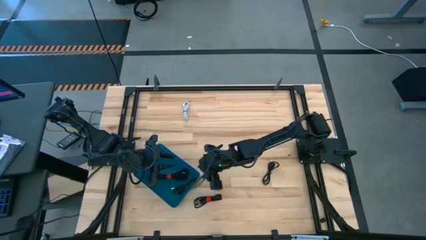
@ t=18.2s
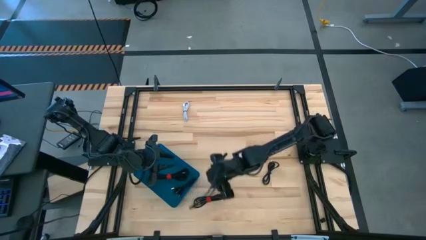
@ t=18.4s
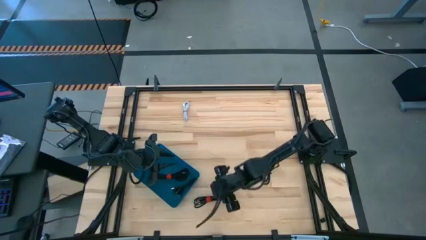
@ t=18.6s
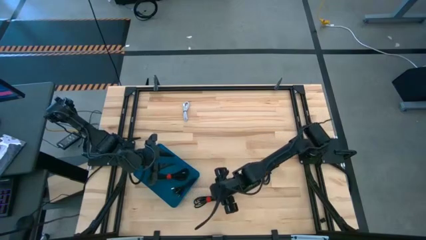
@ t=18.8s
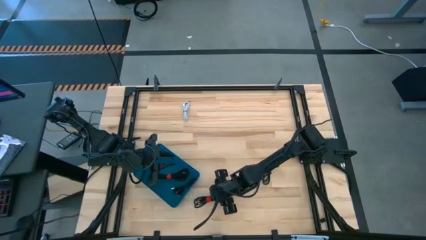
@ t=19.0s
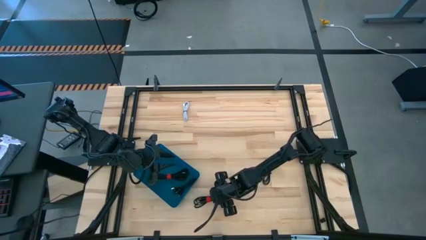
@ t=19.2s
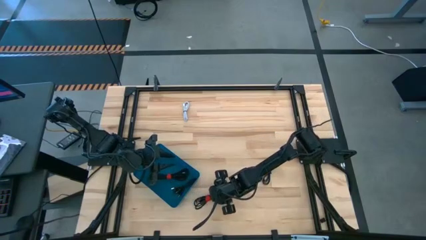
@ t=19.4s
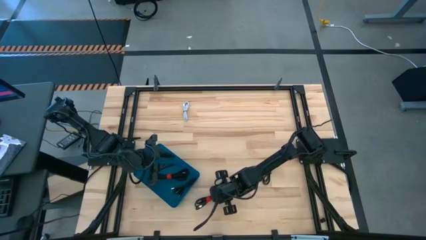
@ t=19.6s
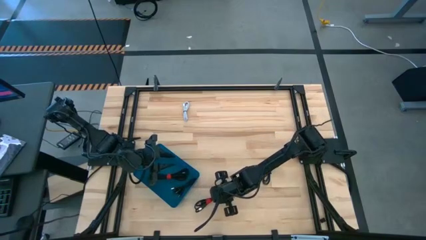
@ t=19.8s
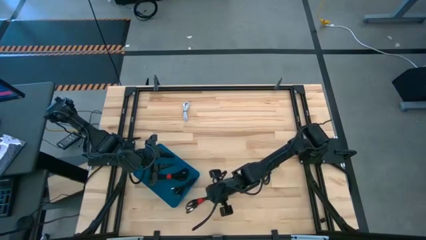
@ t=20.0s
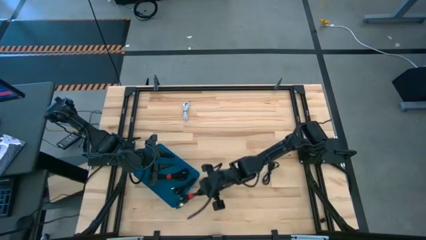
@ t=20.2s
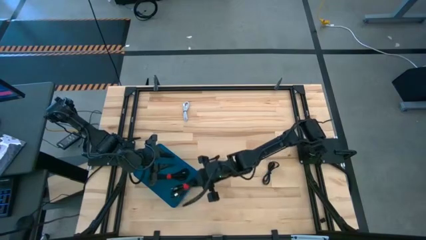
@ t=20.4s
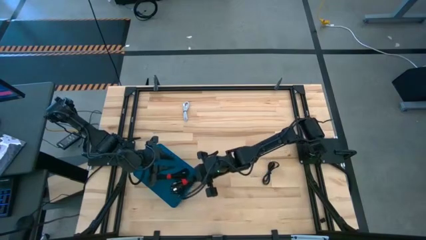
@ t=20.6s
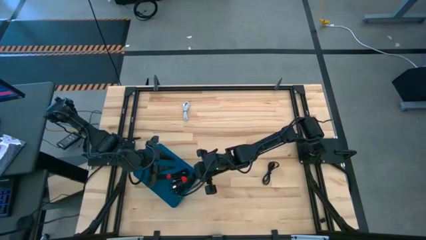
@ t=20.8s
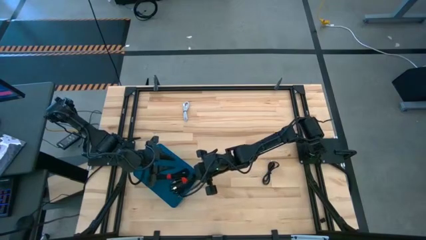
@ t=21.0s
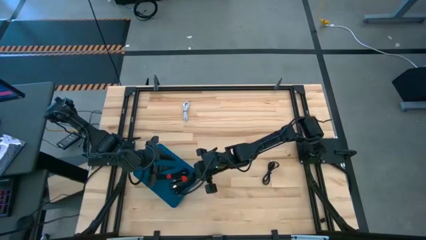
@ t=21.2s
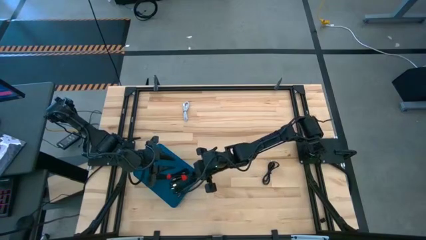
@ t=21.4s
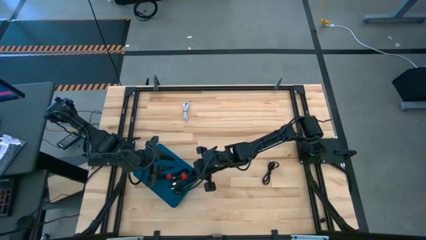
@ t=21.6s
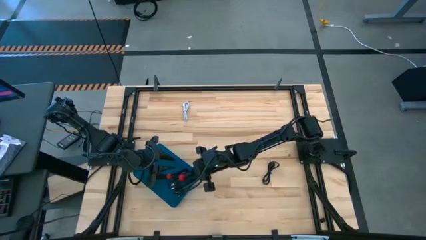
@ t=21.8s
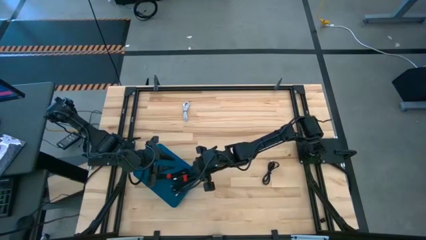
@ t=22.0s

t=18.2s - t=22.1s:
Task: Pick and place USB-C Cables
Put the black charger cable into the blue bin

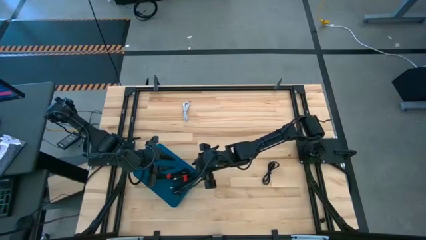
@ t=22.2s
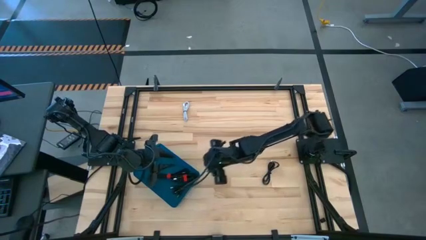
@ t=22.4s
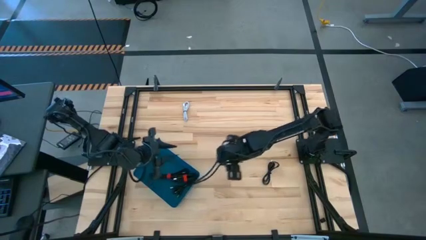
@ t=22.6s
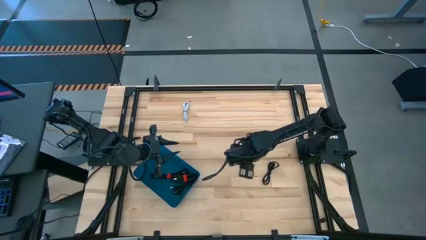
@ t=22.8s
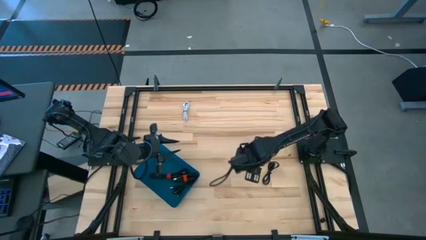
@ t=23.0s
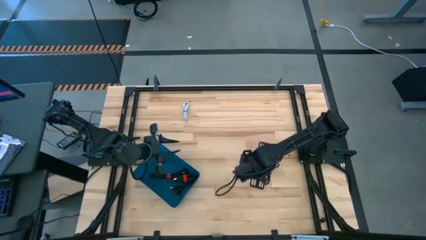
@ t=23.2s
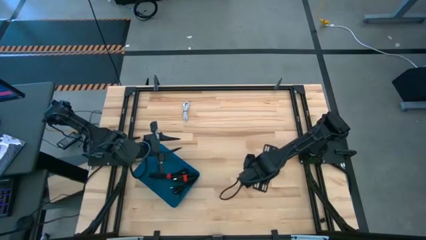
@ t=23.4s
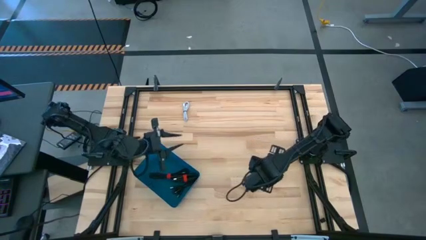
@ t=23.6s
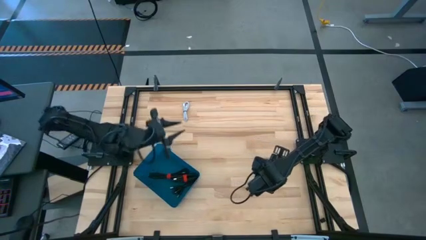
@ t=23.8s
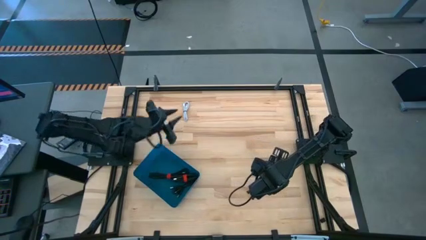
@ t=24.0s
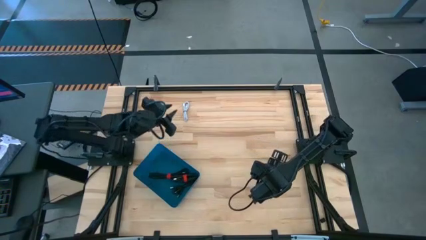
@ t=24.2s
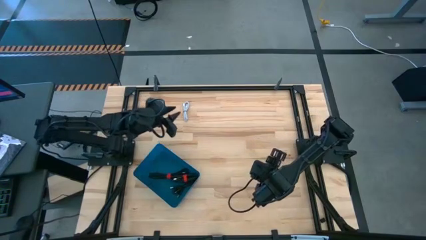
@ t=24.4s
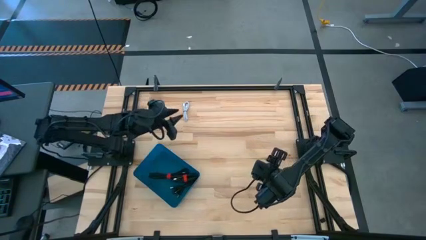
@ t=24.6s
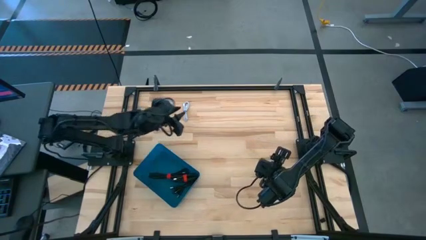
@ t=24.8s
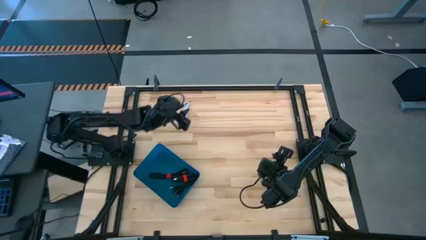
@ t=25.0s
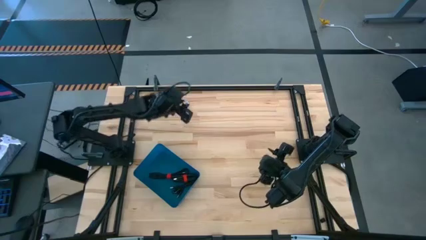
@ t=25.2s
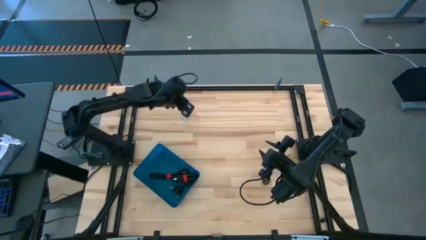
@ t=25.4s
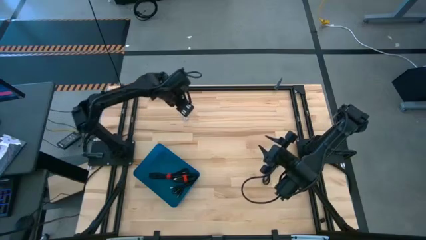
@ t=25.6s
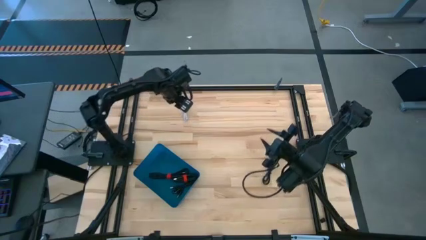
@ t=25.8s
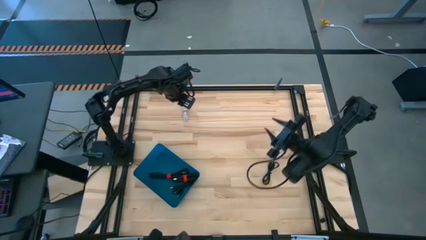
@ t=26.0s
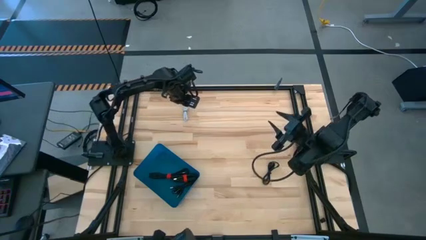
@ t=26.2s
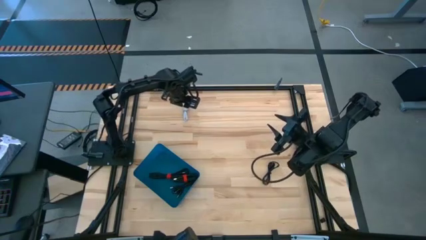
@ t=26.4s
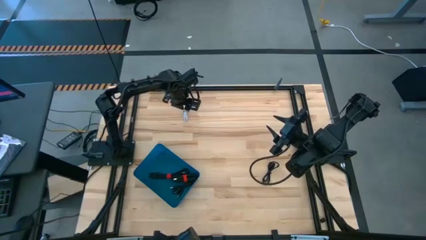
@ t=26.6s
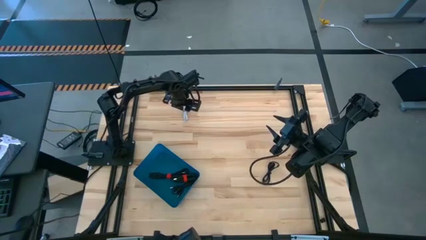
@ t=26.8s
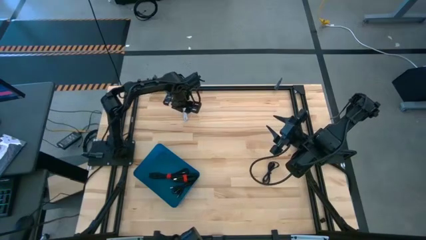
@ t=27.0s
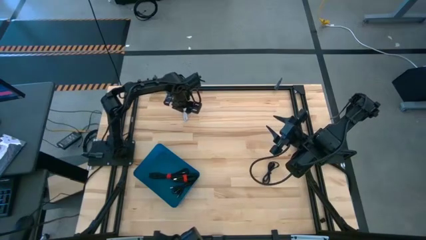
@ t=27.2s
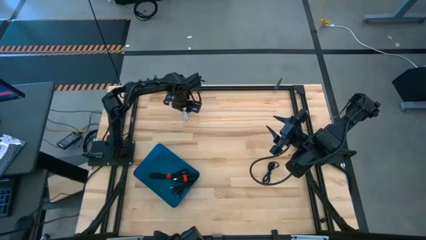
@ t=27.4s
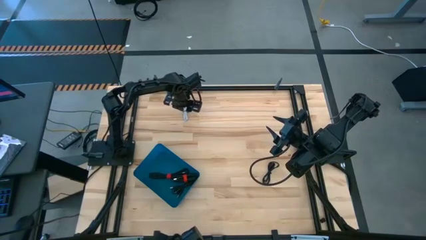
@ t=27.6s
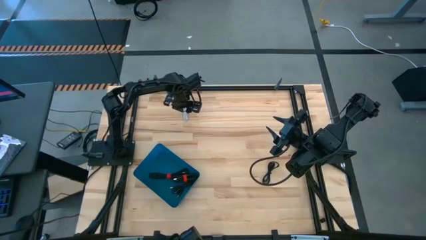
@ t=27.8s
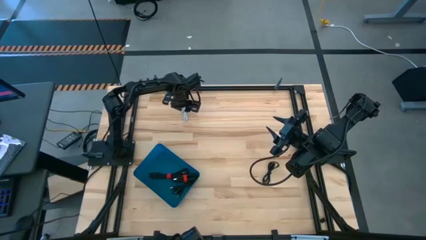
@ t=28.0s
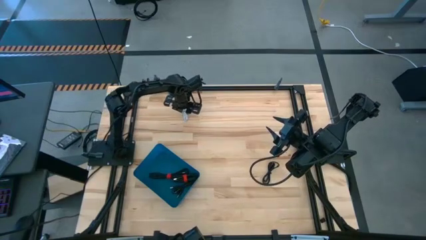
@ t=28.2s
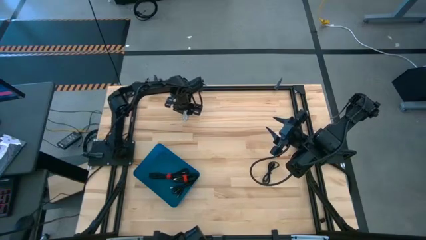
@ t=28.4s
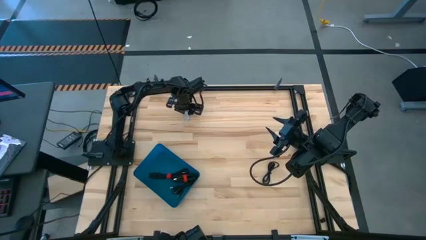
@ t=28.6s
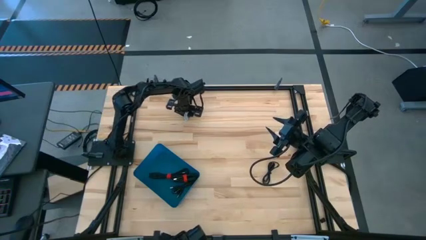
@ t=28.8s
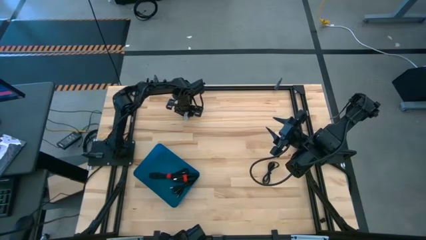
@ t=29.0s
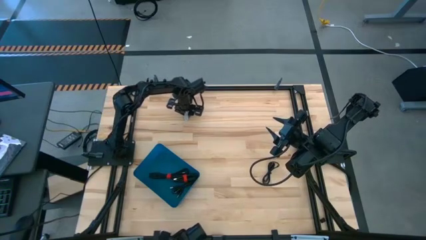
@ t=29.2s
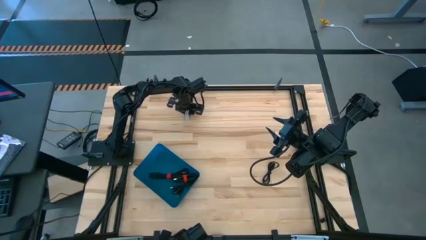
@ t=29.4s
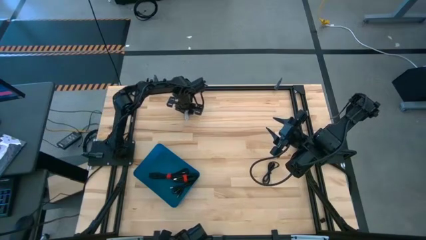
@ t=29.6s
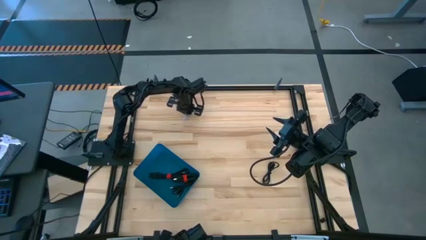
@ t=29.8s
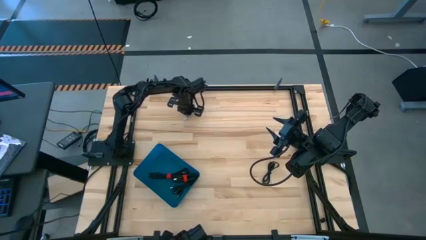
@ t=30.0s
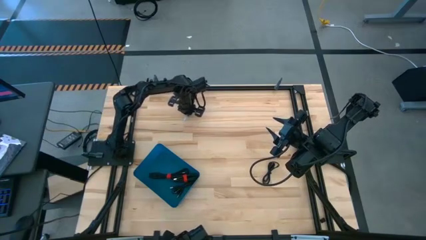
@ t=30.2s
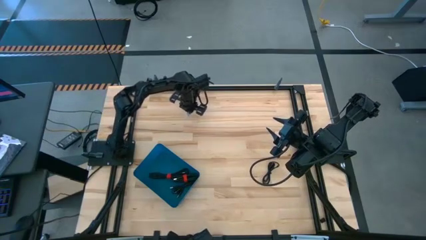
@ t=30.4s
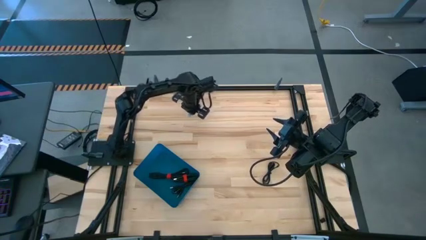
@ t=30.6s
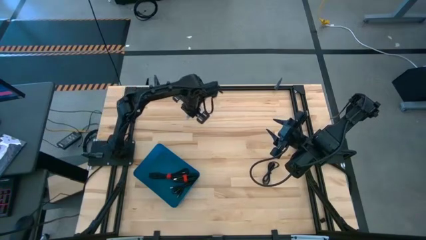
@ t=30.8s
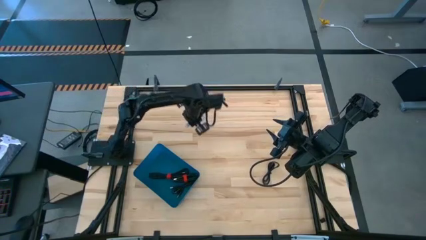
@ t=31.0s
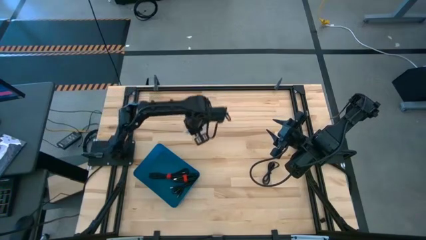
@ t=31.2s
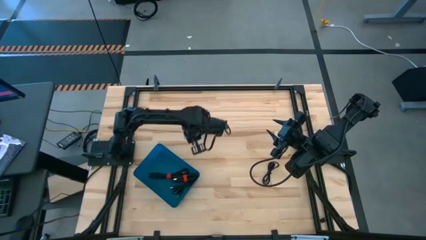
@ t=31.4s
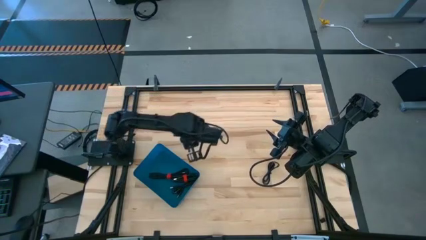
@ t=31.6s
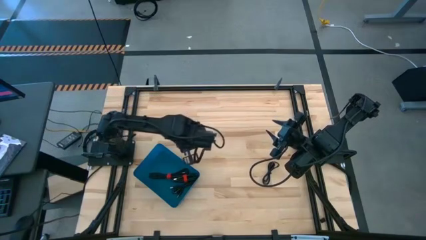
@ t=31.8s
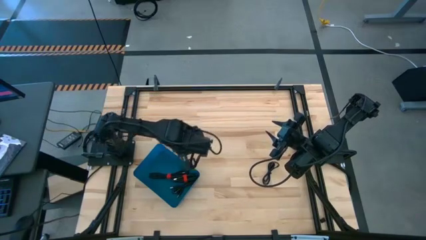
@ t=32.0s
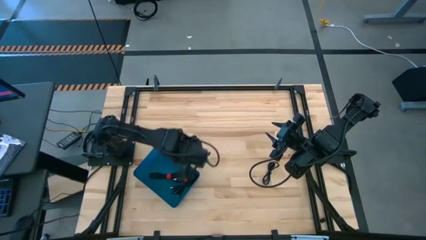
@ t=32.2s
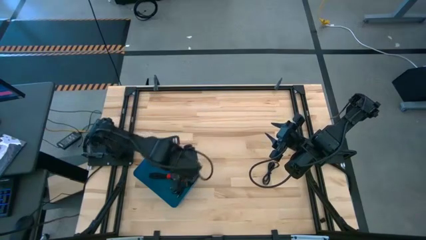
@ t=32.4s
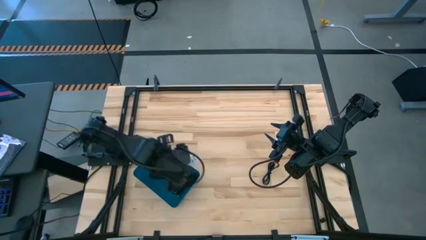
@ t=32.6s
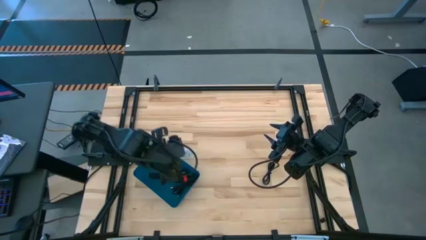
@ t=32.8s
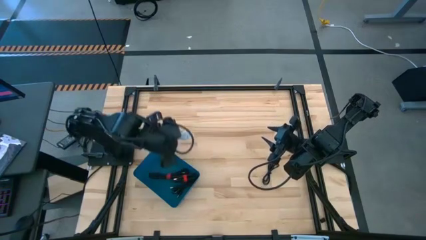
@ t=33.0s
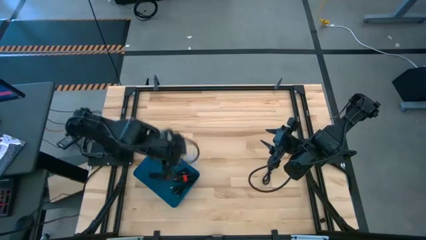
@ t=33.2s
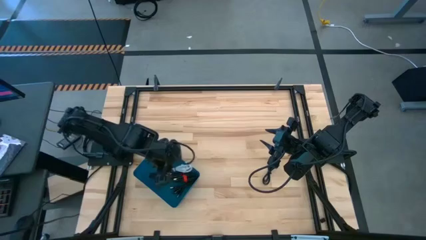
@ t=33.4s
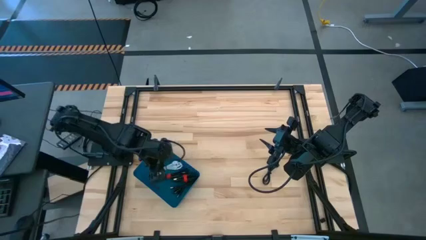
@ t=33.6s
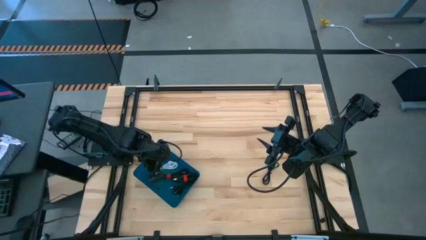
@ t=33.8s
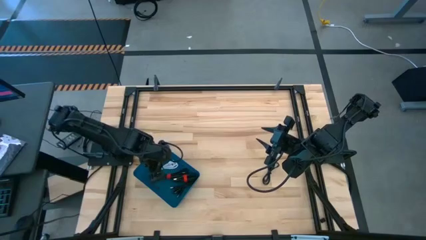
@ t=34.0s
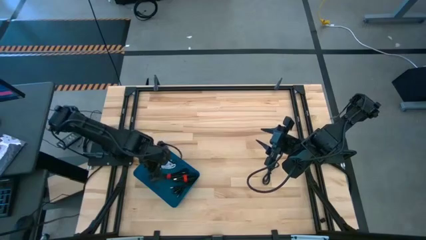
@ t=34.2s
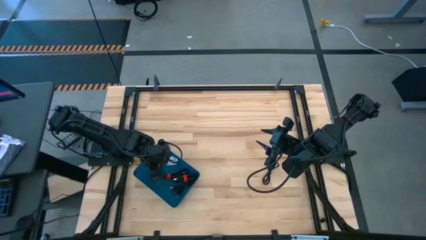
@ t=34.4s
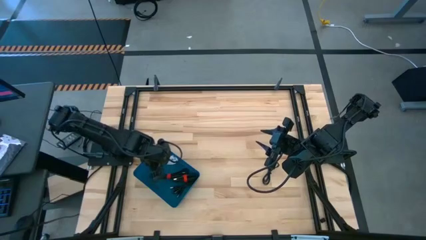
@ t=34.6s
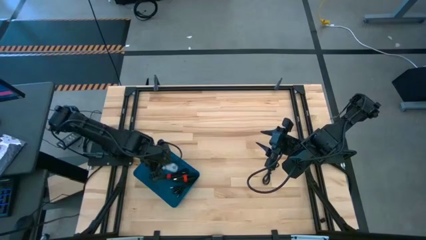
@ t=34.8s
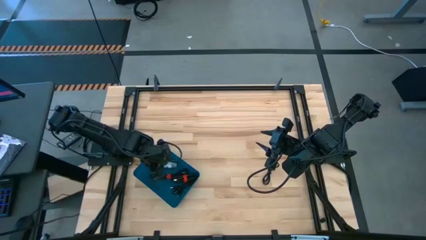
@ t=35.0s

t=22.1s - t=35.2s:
Put the white charger cable into the blue bin
